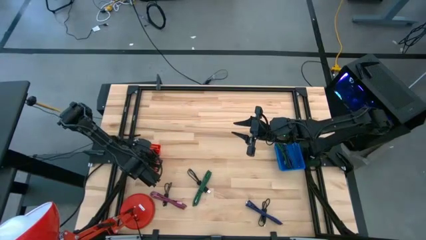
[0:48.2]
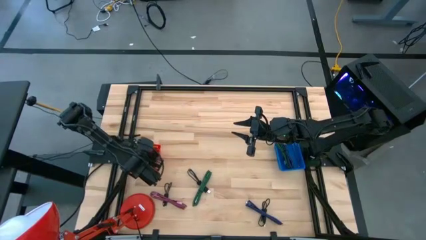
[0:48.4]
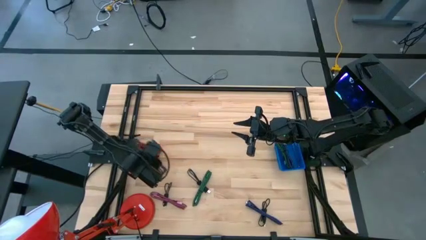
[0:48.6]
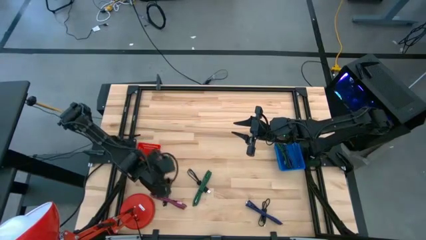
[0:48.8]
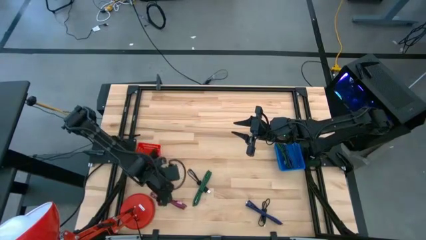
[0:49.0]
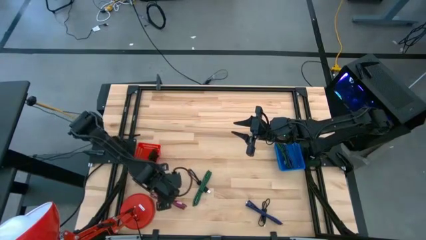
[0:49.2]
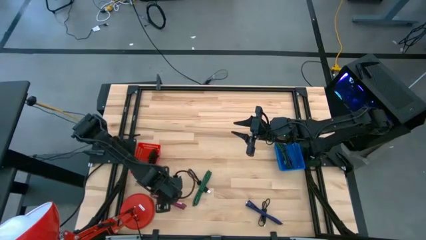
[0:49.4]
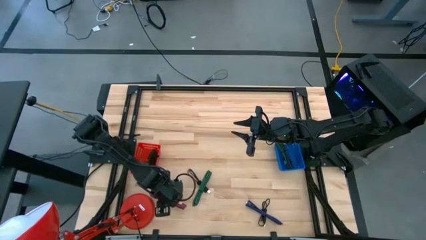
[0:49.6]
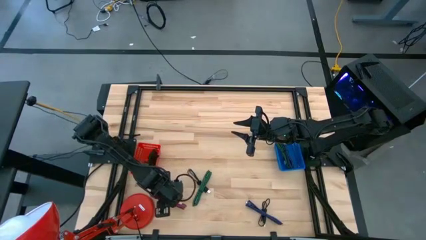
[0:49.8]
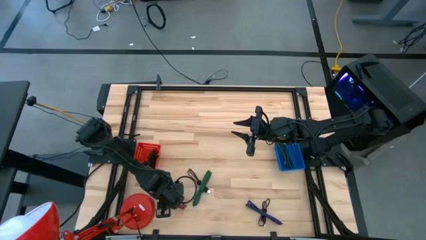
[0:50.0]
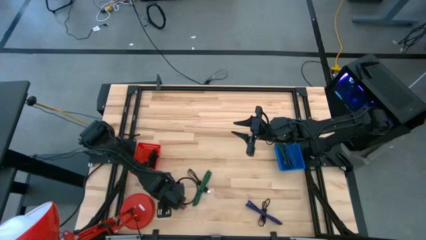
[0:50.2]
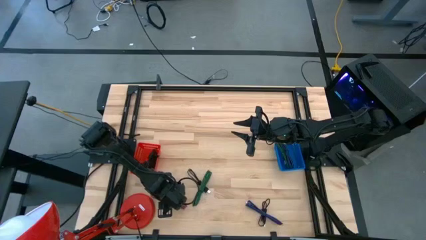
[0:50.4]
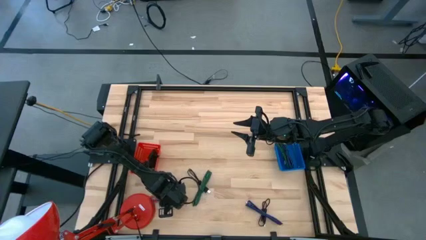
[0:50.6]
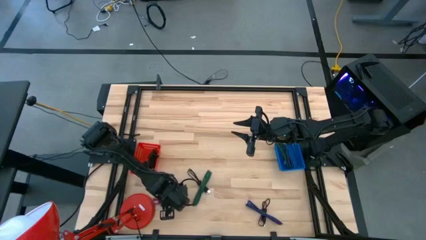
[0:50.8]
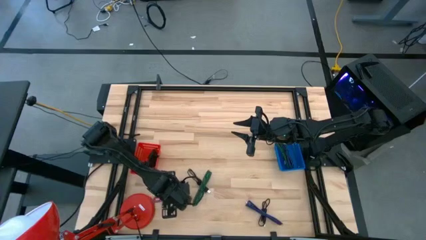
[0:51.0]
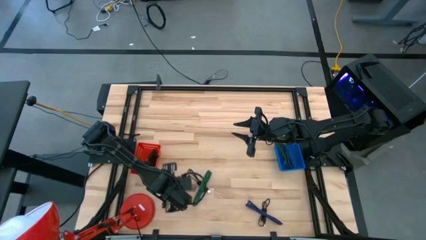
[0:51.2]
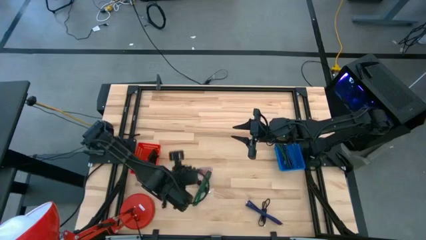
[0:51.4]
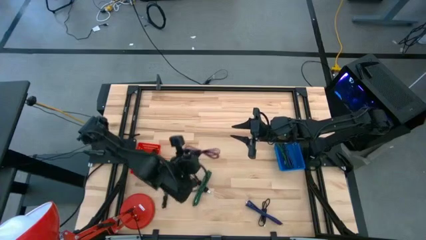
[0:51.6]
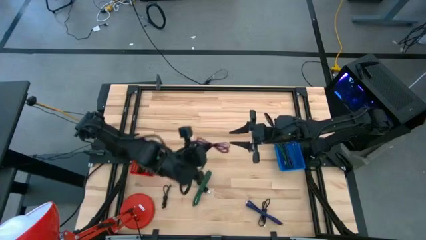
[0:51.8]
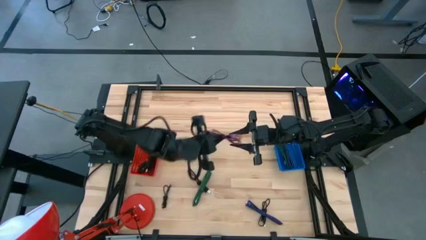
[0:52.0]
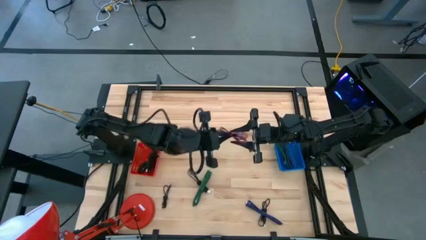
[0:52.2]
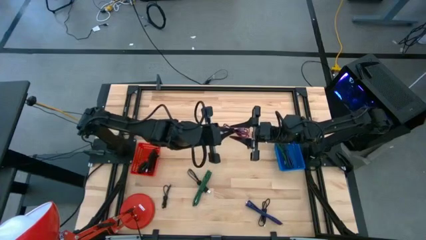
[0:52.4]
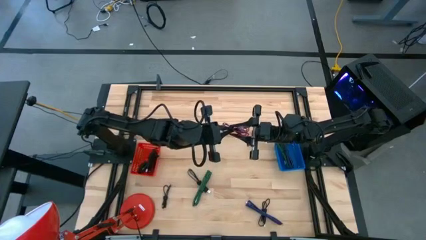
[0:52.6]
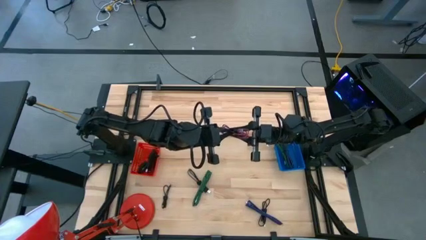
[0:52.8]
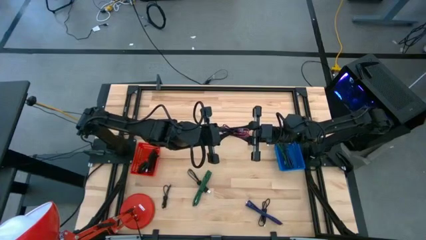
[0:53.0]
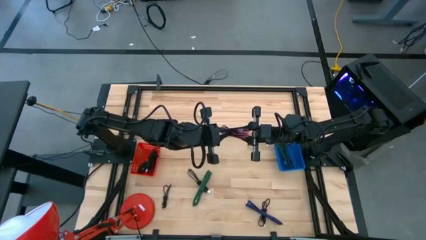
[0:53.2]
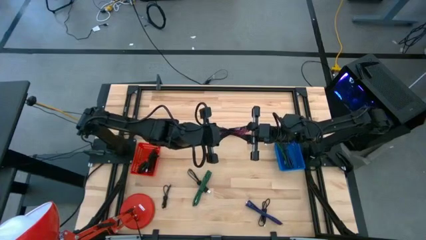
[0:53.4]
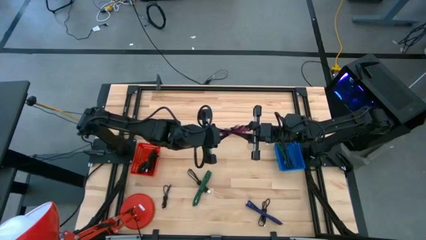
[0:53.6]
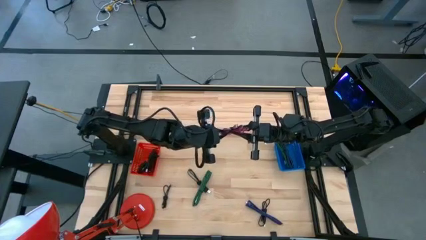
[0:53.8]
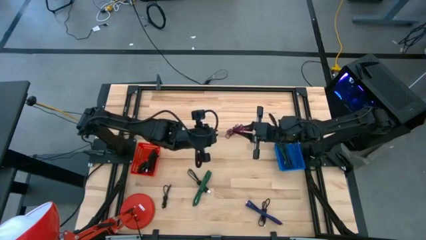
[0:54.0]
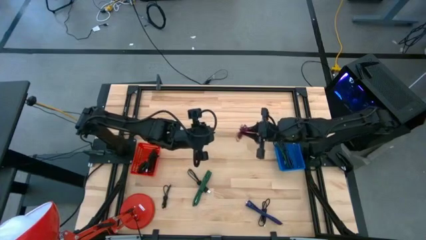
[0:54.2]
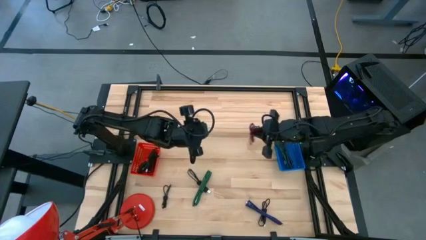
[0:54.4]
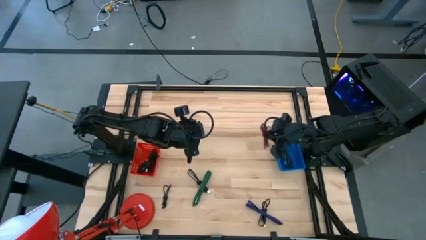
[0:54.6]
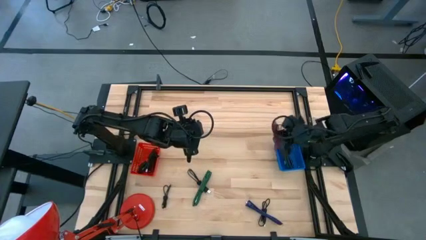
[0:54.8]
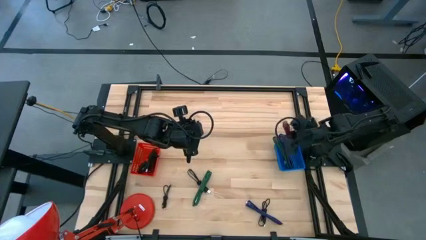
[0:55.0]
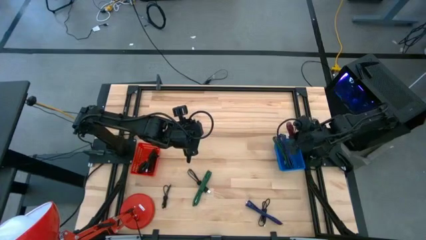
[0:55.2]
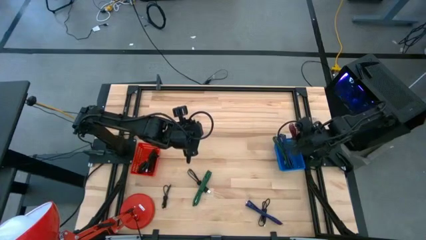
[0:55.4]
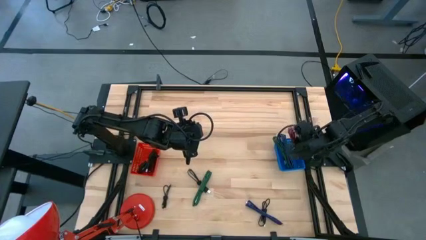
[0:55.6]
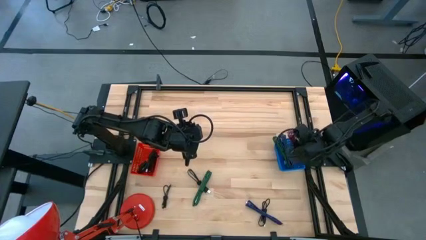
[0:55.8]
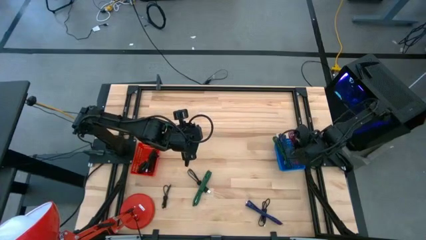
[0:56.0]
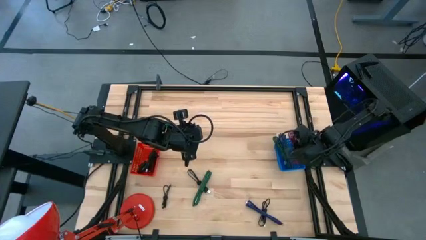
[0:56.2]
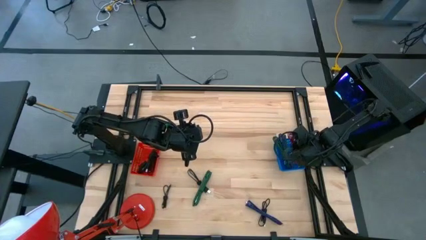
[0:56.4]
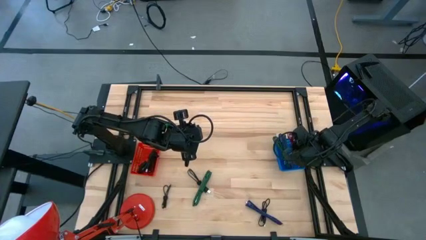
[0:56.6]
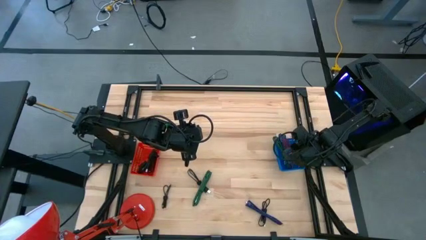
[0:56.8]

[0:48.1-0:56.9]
Task: Pick & Place USB Port
Put the pink charger cable into the blue bin

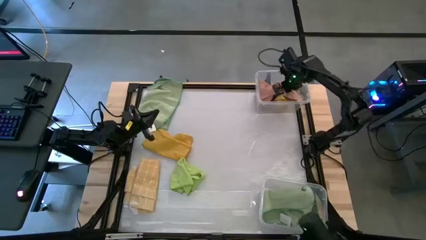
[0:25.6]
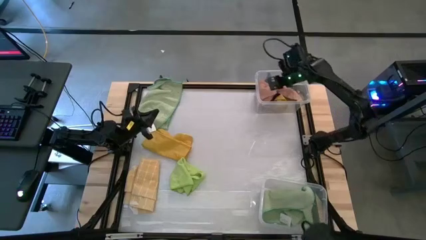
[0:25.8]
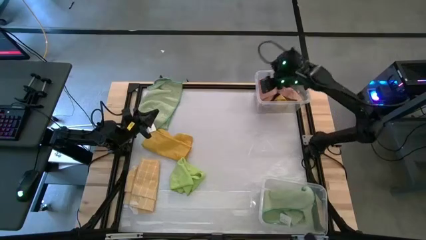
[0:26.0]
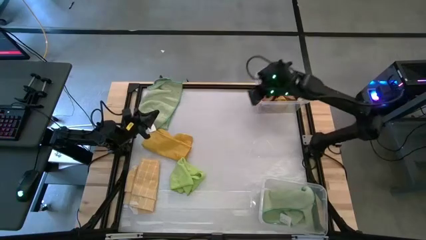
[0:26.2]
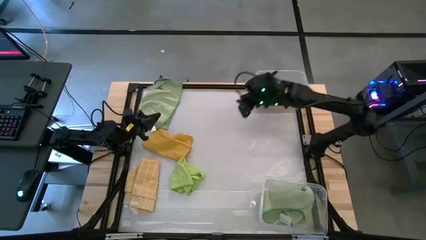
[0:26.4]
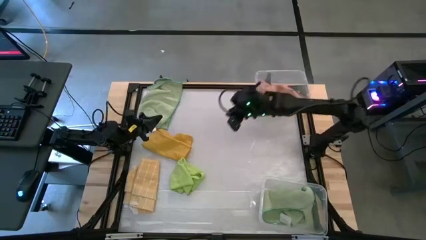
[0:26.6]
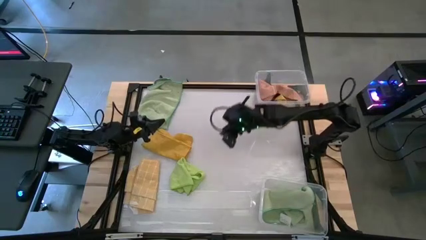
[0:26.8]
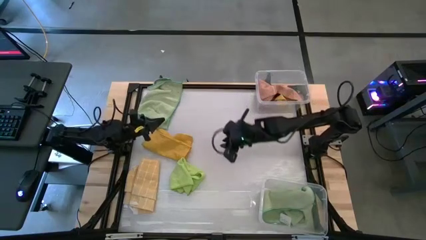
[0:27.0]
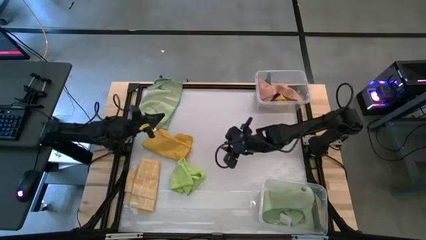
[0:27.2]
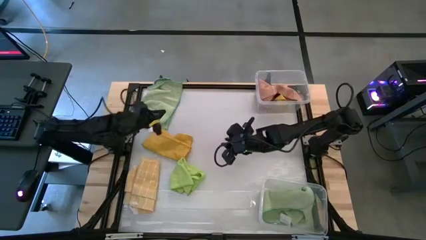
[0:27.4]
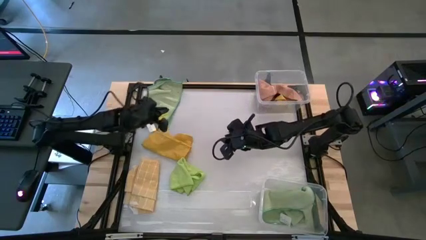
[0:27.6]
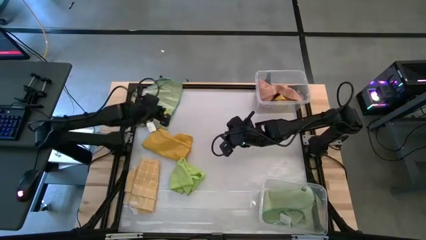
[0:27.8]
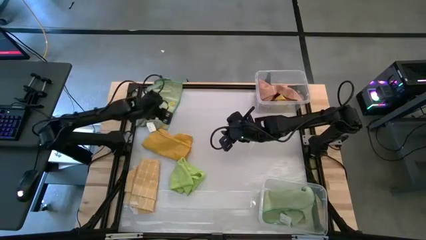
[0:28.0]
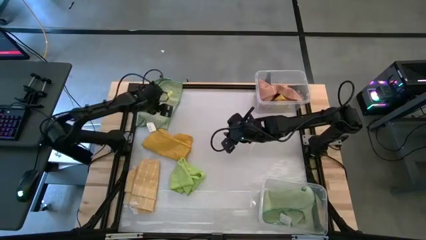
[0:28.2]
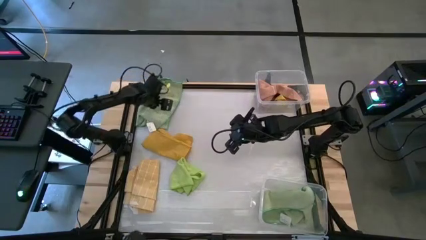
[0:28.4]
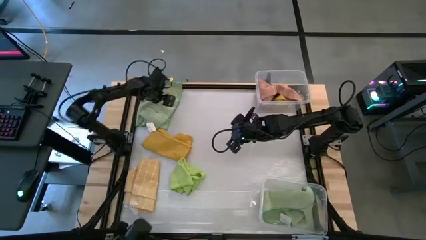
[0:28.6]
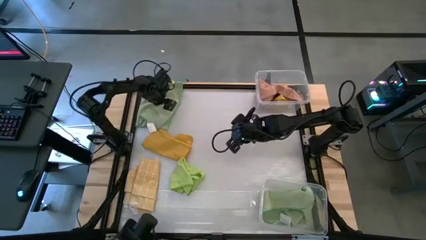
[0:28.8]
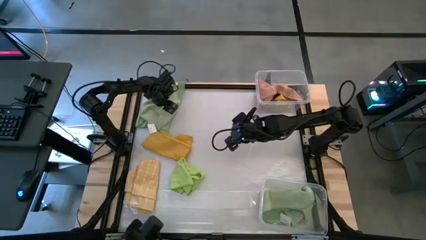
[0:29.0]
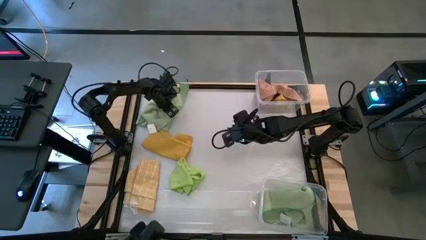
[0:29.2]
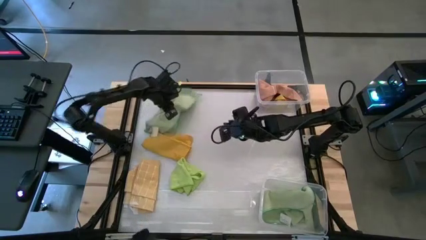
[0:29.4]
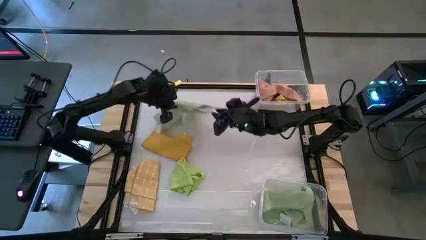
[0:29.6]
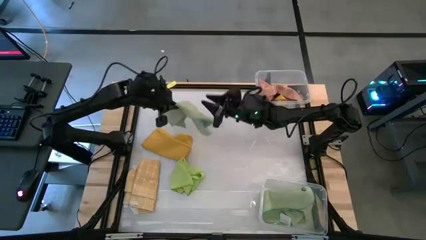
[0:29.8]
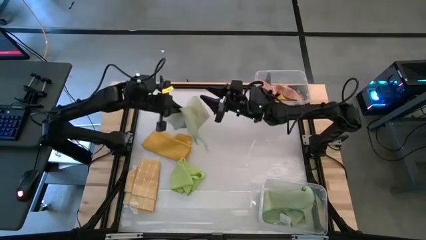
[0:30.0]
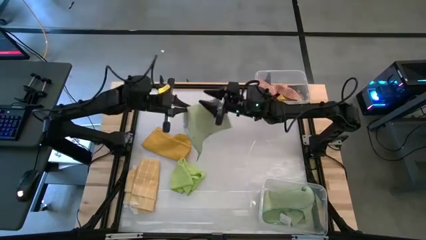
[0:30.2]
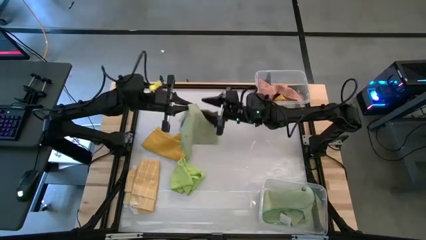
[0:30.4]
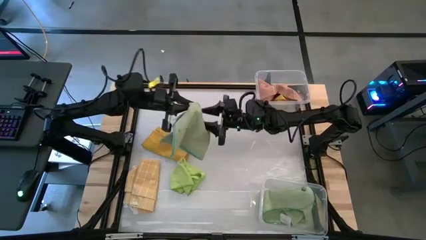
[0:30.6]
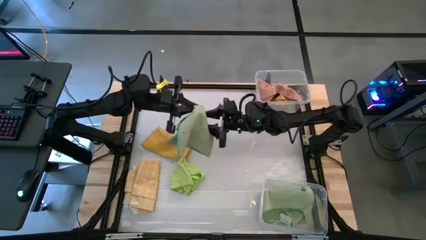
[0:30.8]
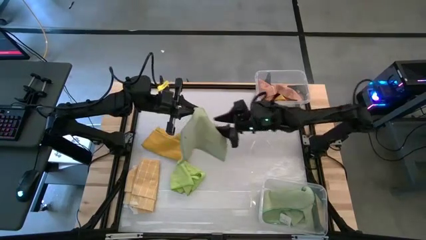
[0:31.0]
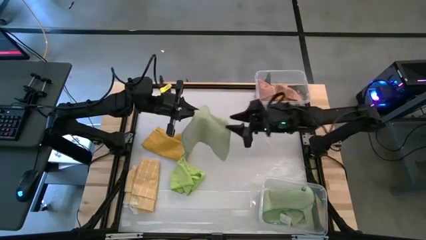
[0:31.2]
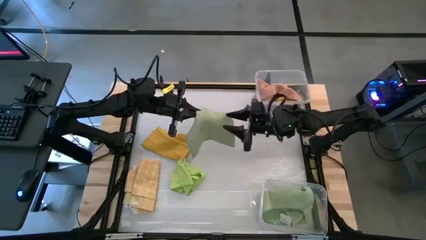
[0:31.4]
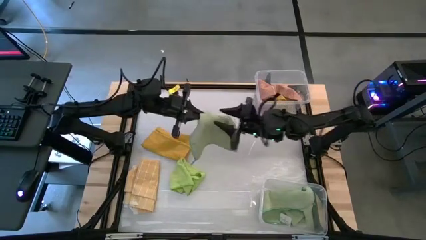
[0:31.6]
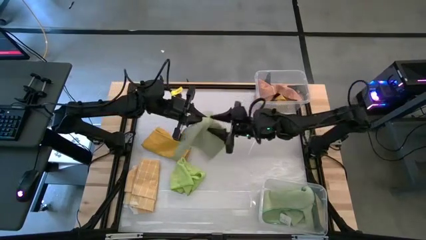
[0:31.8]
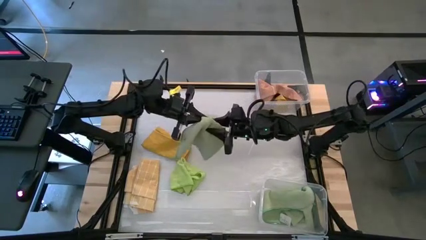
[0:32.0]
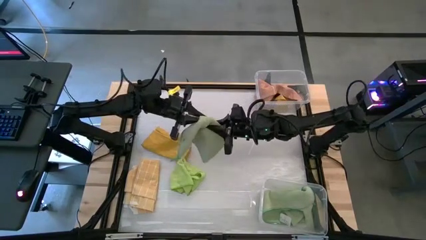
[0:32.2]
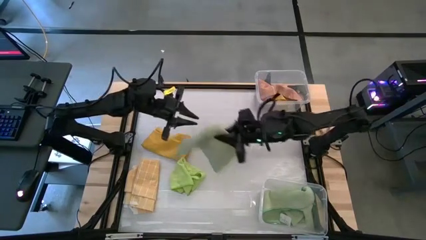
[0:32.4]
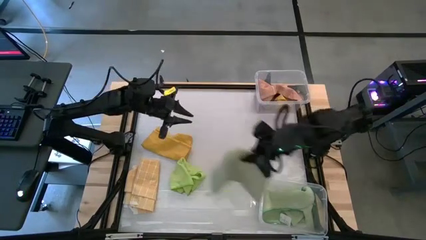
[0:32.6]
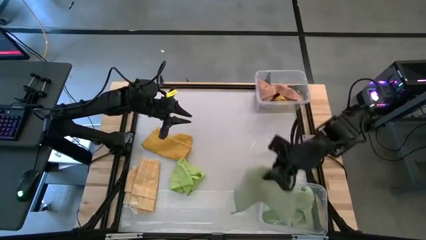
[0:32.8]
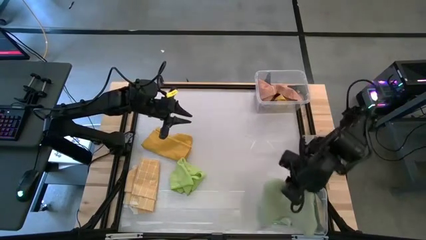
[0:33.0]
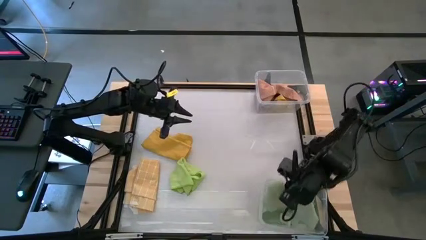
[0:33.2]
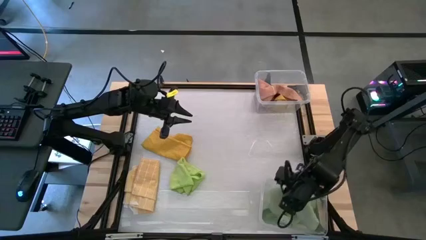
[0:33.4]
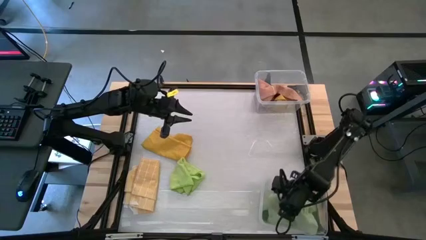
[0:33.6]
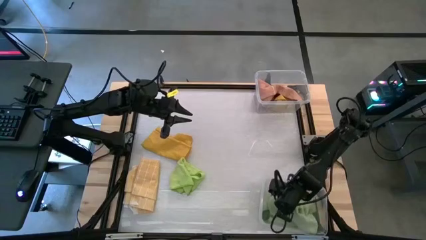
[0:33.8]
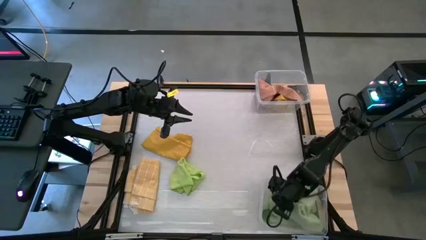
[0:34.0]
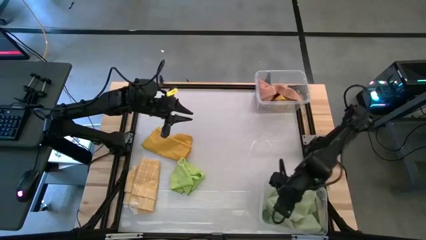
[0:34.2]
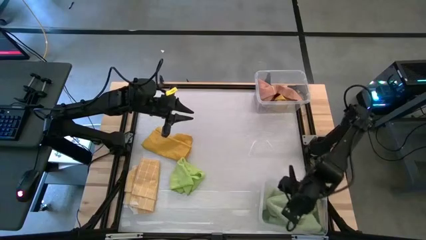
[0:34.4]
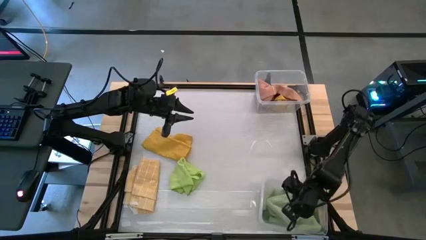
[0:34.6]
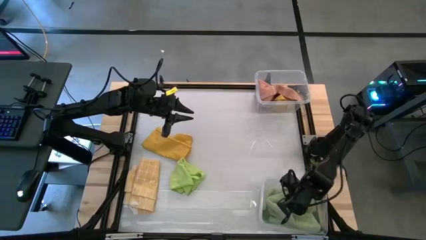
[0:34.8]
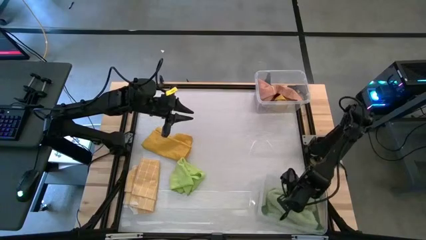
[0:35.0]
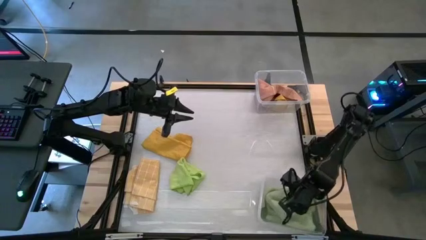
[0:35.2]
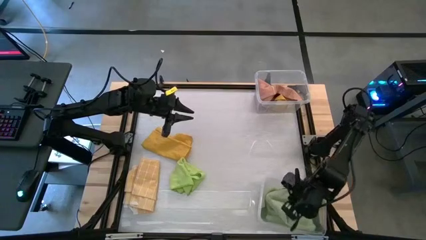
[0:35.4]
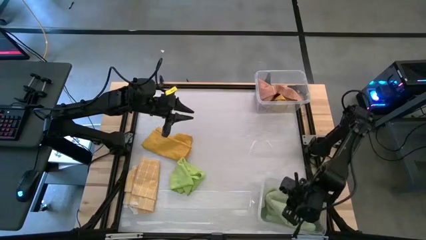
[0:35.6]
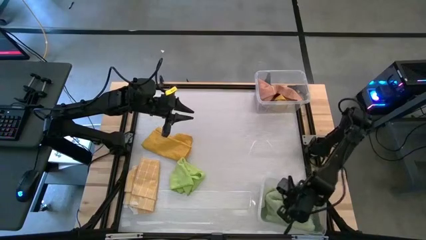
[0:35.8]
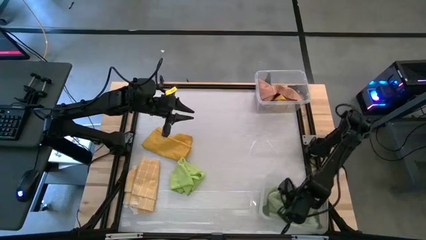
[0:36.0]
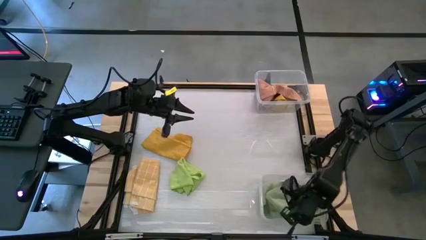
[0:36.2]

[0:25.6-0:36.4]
Task: Sort microfiber towel by color & place in baskets
Put the light green microfiber towel into the bottom transparent bin
